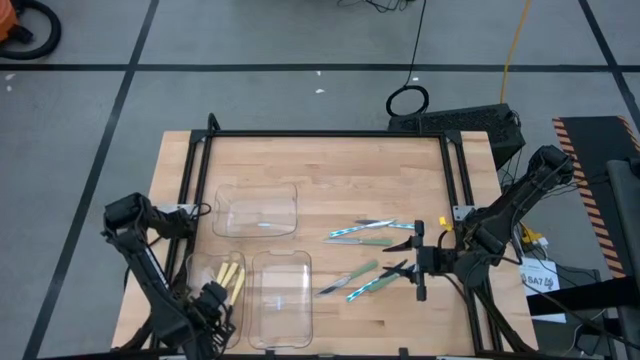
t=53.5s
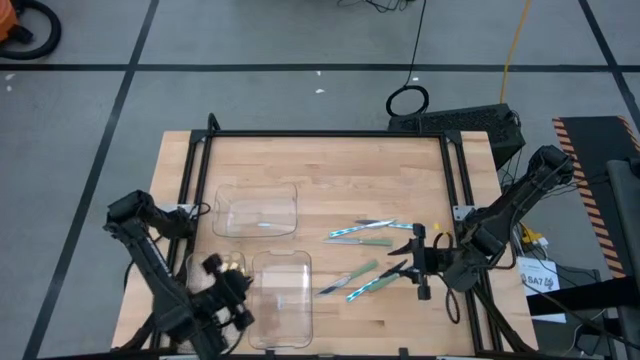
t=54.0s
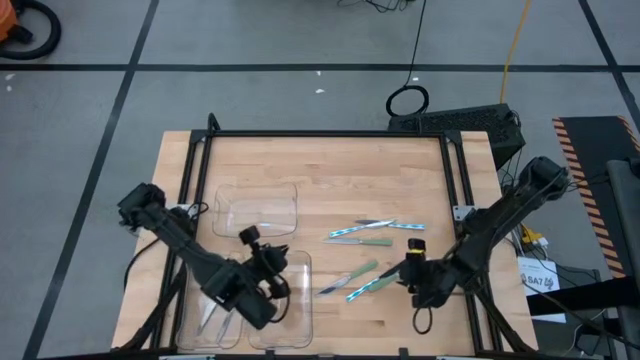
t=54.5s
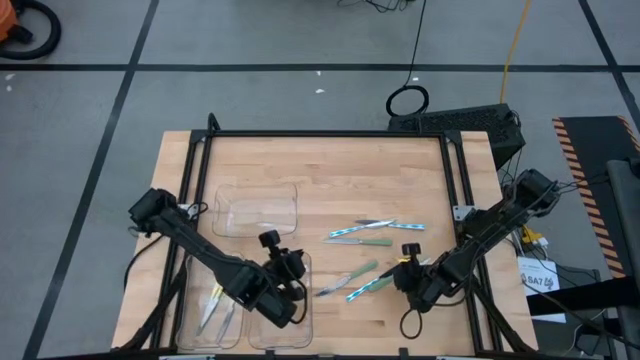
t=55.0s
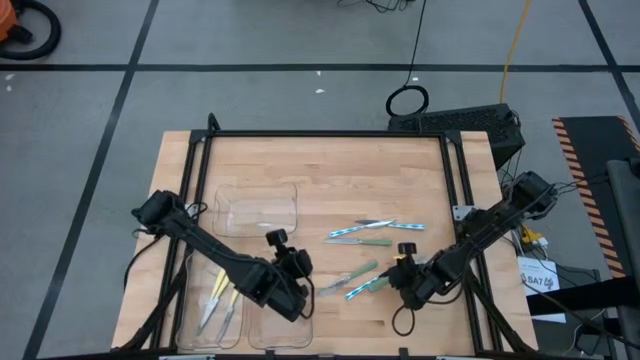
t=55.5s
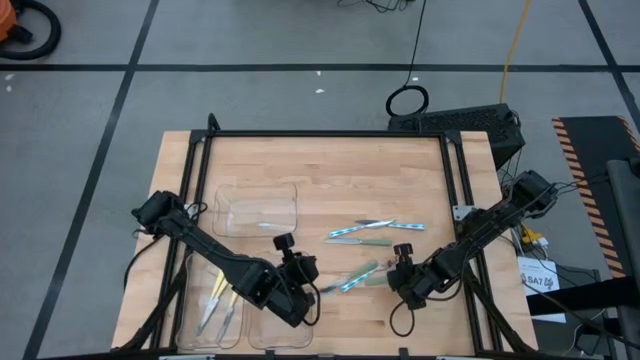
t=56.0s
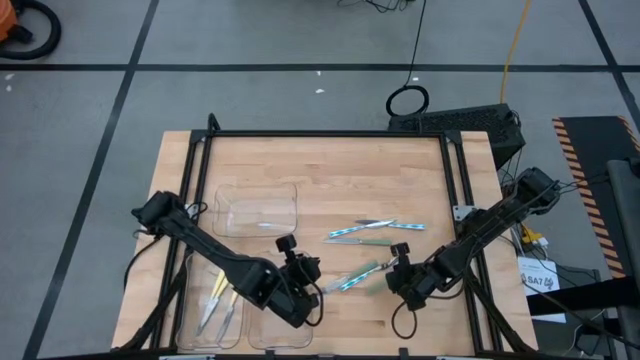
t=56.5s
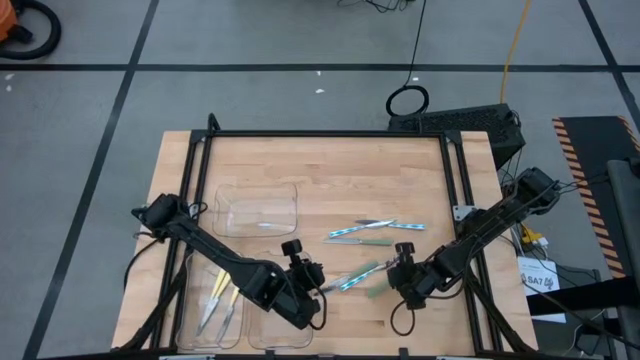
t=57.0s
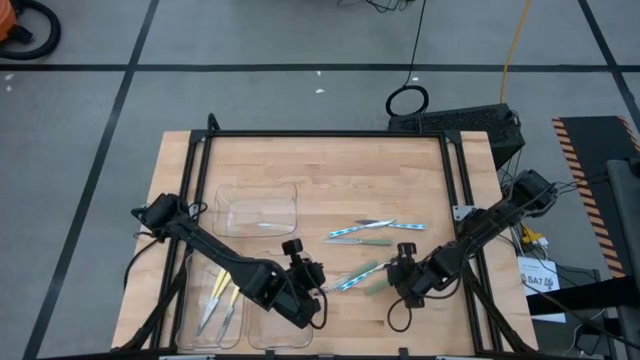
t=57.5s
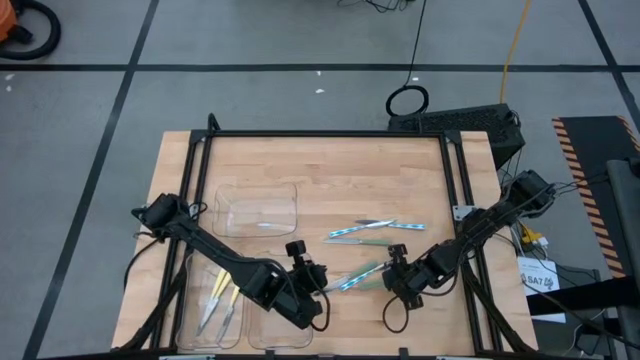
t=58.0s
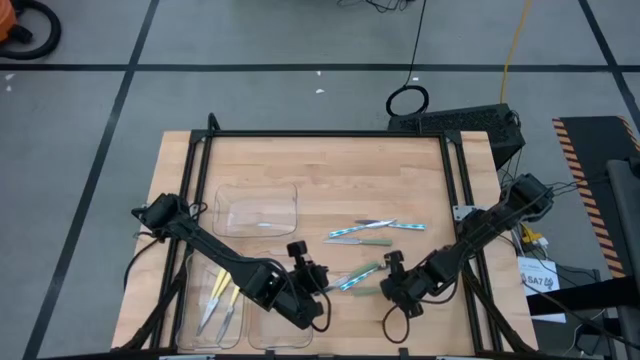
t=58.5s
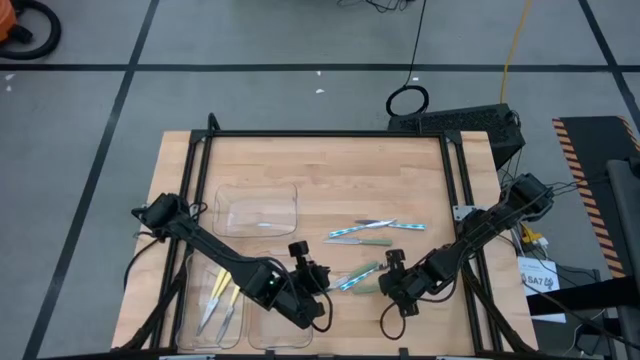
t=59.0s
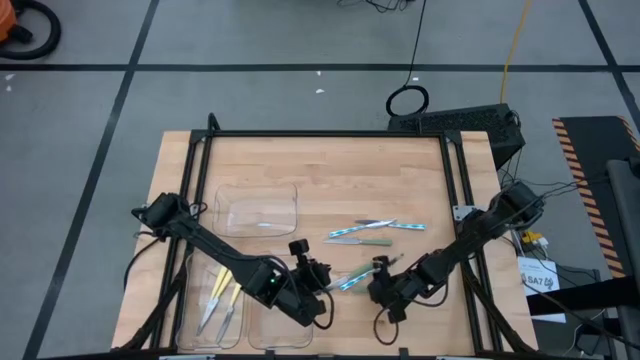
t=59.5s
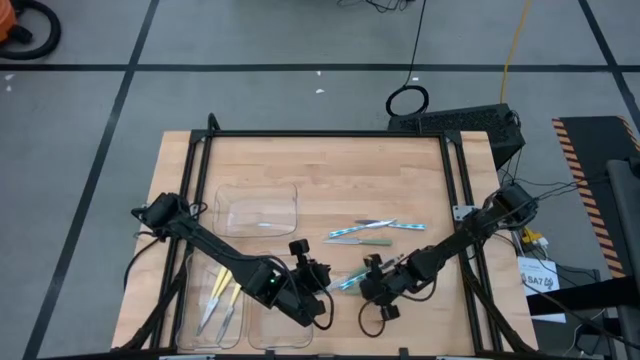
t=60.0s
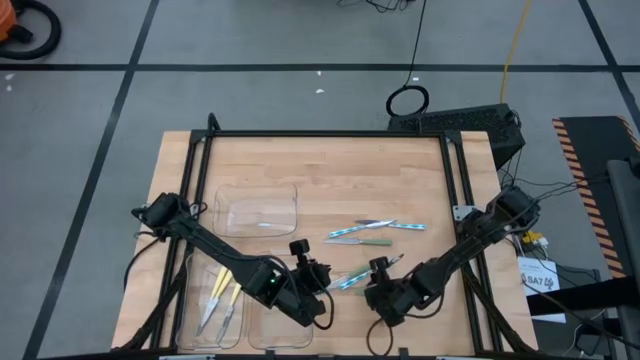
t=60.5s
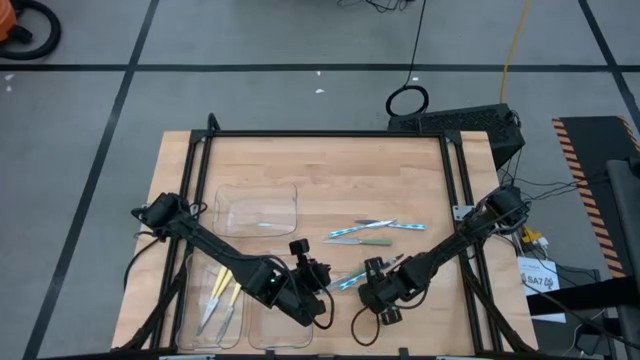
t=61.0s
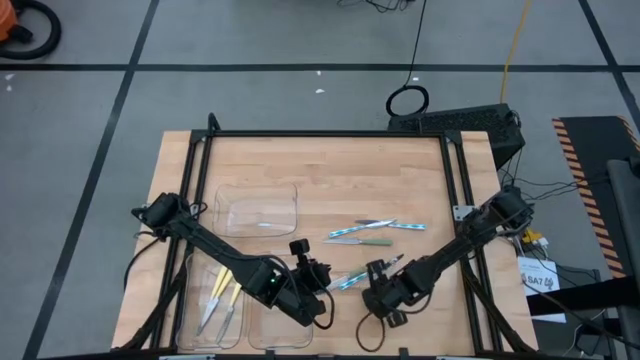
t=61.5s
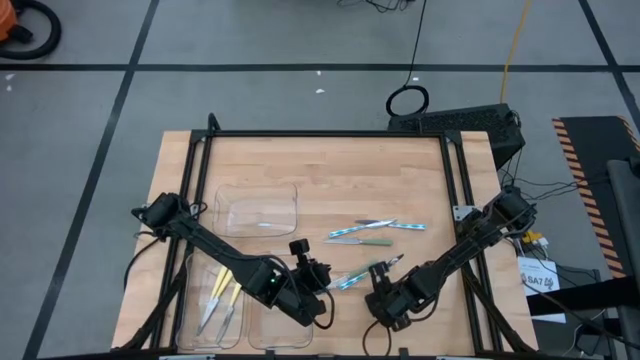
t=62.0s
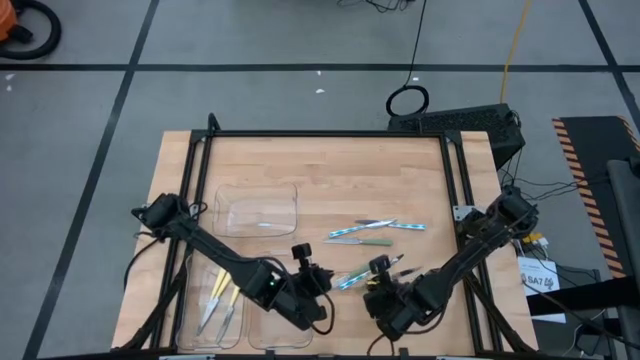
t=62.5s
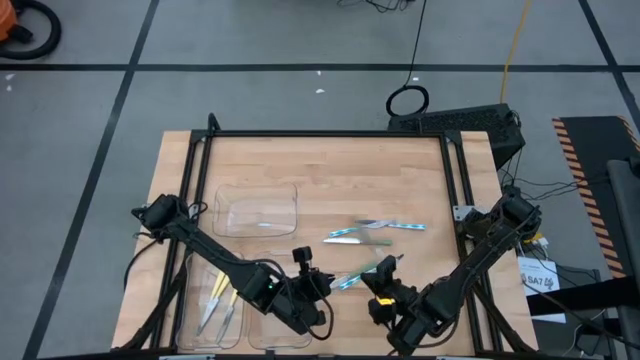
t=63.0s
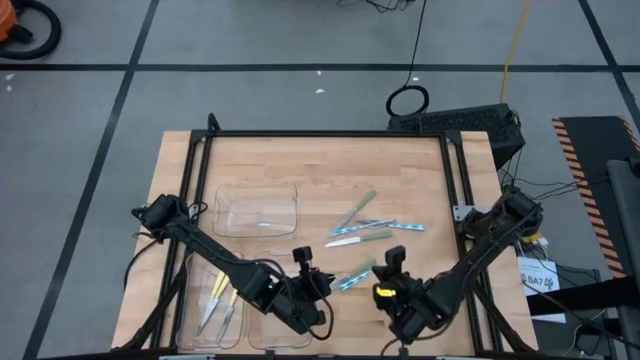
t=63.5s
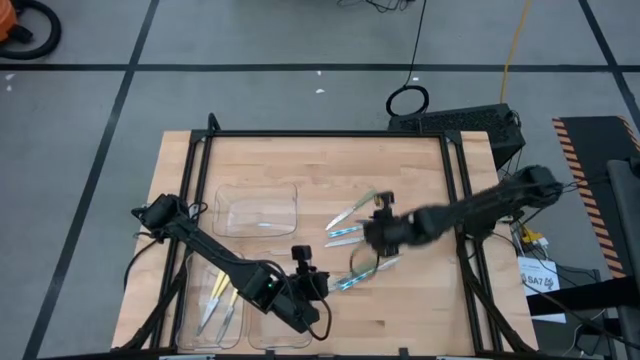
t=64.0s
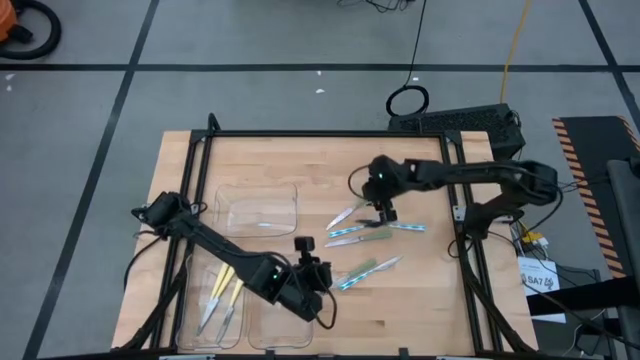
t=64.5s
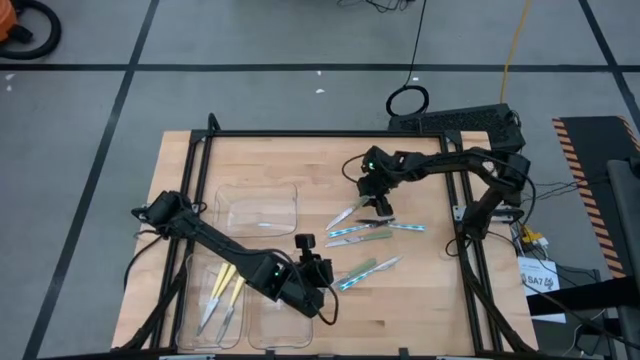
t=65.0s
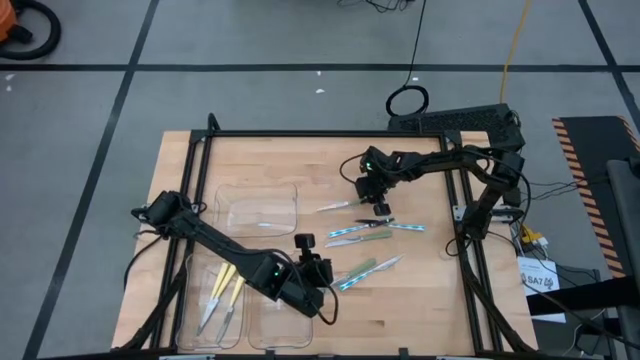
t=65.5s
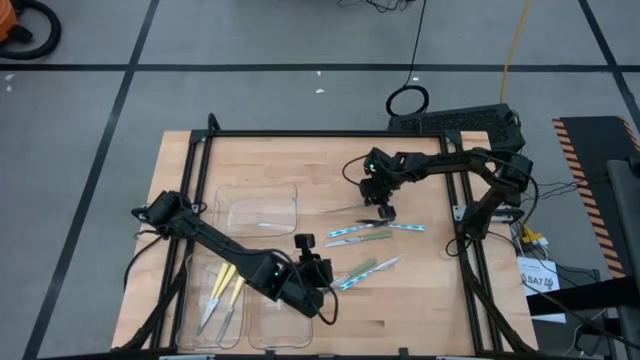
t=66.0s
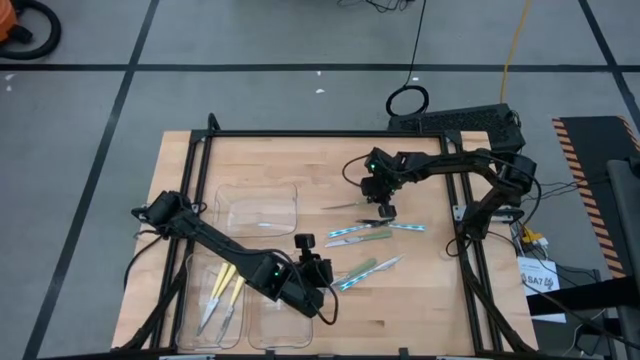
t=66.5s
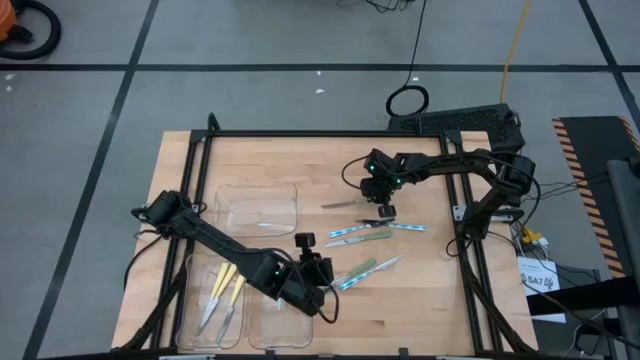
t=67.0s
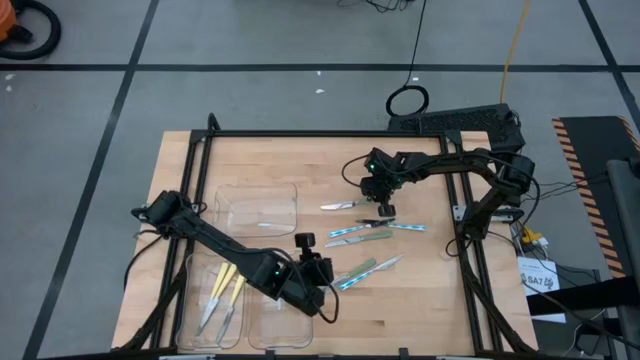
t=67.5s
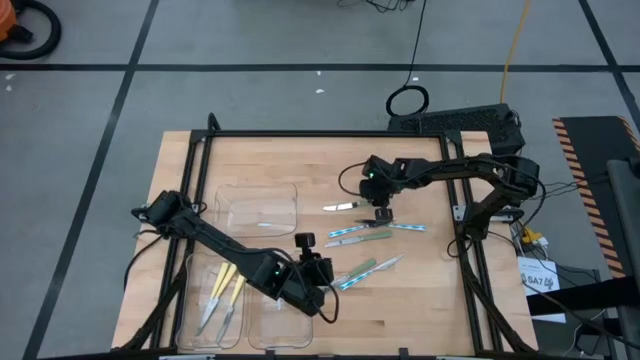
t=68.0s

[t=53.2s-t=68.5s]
Task: Sort silverware by color (type)
Put the bottom green table knife into the top transparent bin

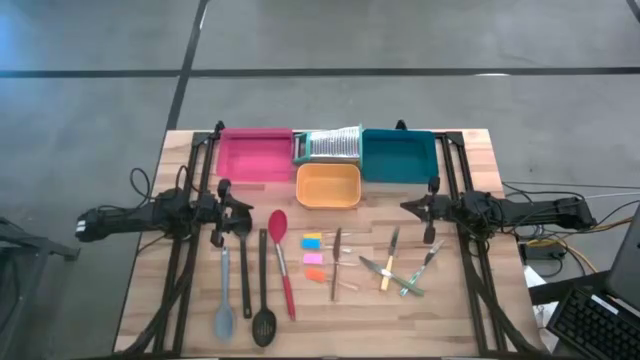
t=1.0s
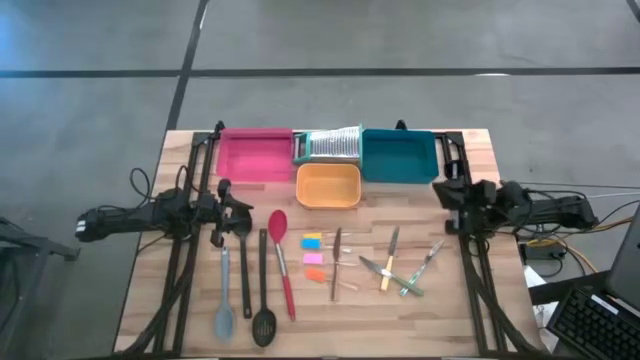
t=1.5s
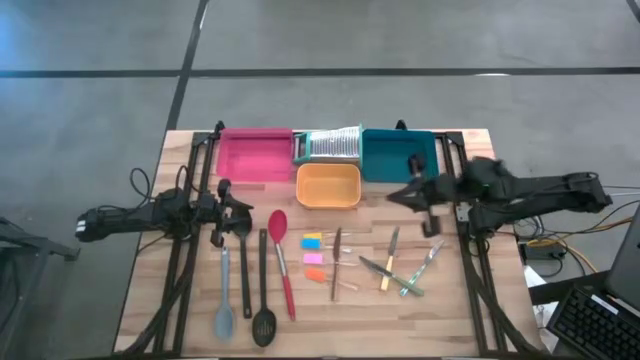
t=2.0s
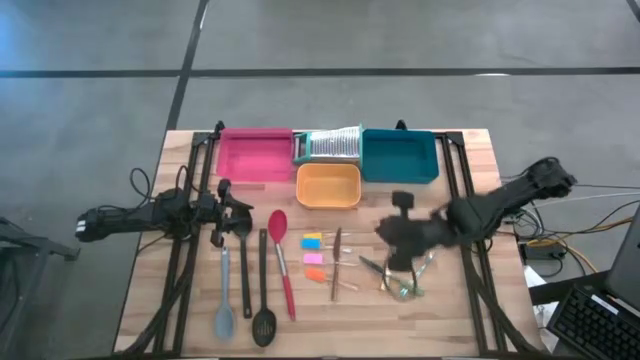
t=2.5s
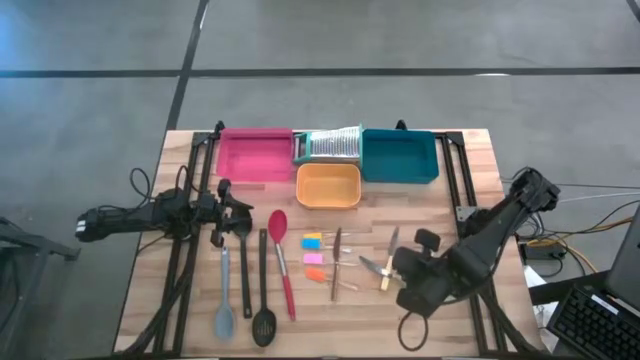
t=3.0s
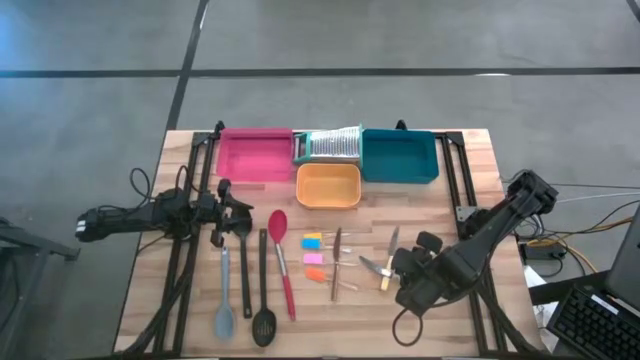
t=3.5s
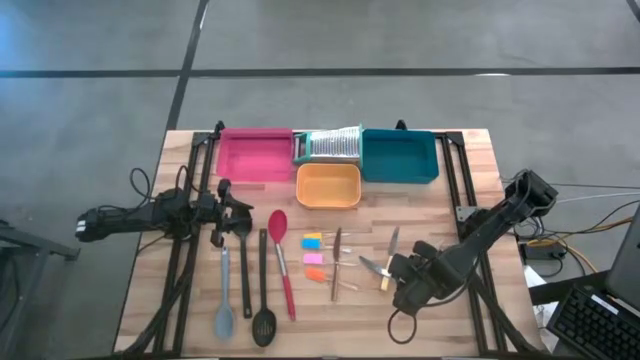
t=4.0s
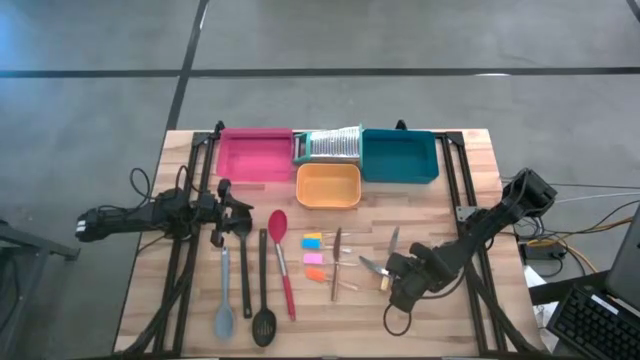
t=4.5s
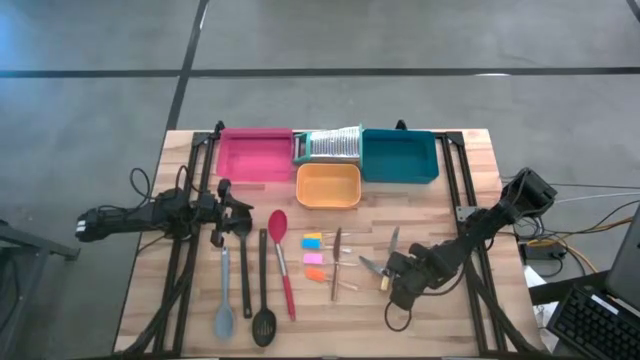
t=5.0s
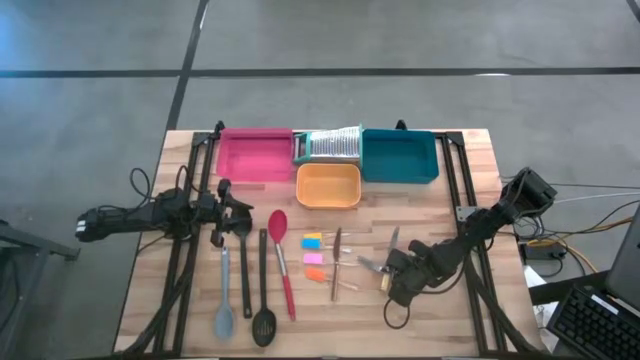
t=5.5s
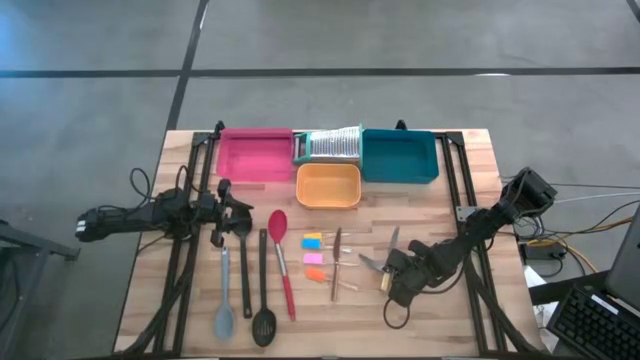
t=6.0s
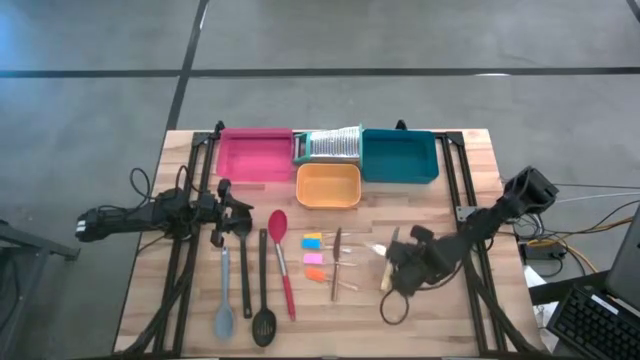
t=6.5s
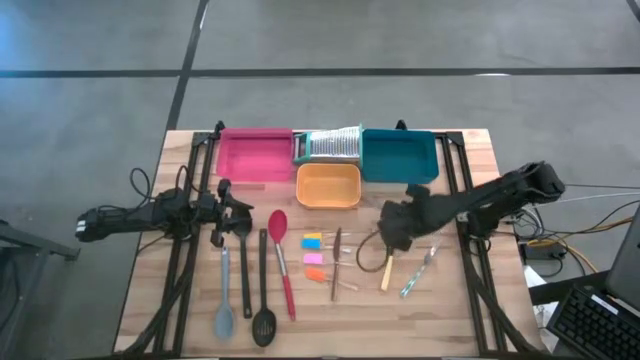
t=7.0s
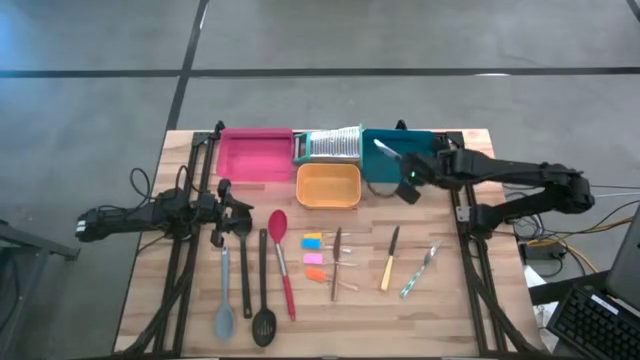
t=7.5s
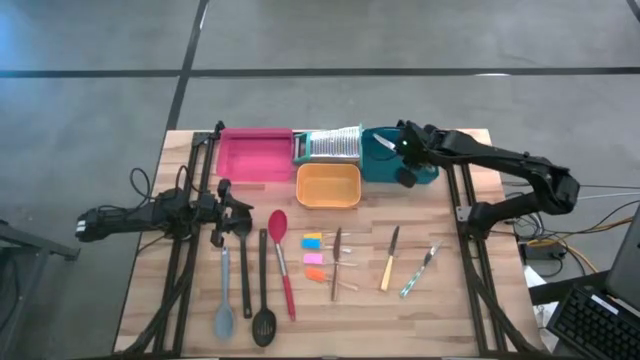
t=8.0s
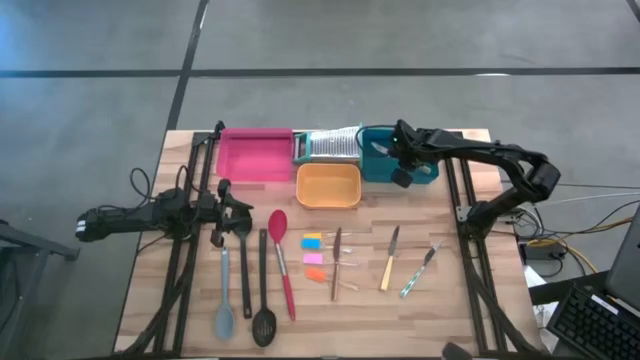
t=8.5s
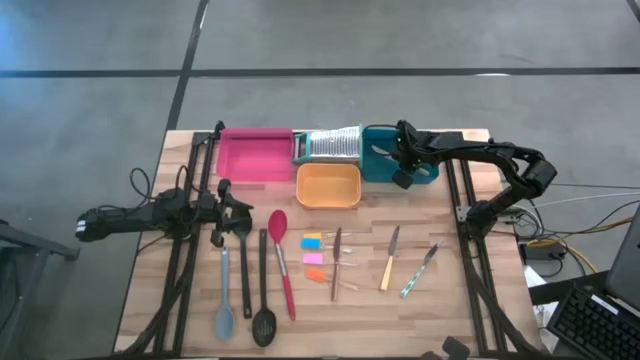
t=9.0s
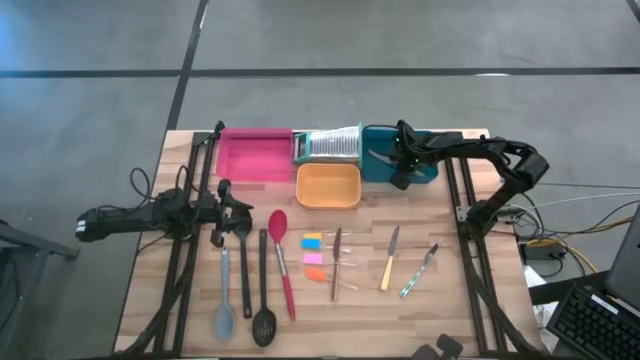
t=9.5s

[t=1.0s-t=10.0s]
Task: Pick & Place Kitchen Items
Put the green knife into the blue bin
